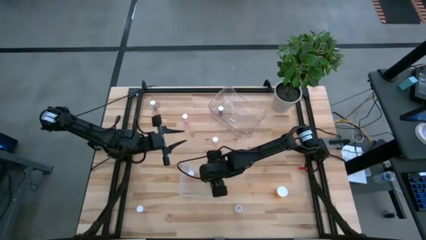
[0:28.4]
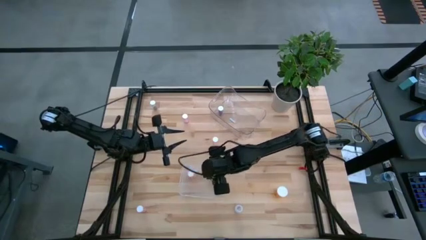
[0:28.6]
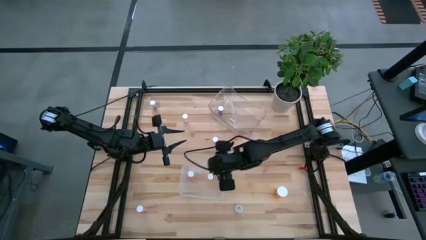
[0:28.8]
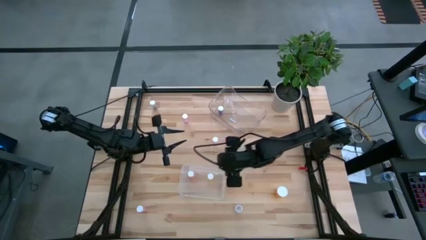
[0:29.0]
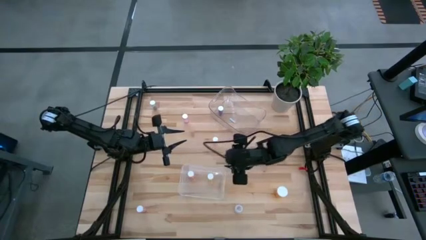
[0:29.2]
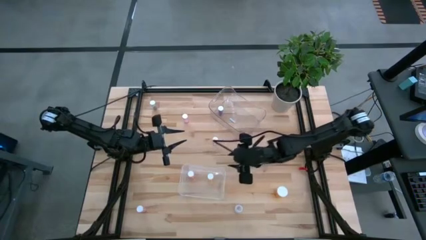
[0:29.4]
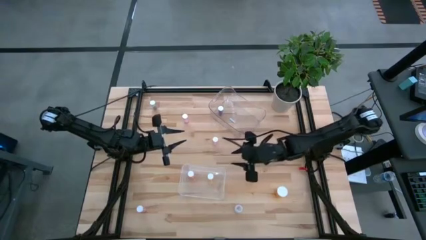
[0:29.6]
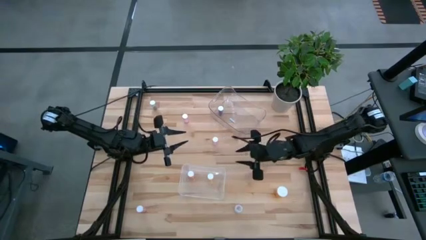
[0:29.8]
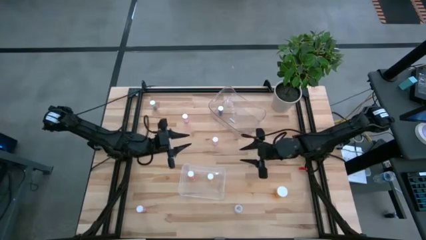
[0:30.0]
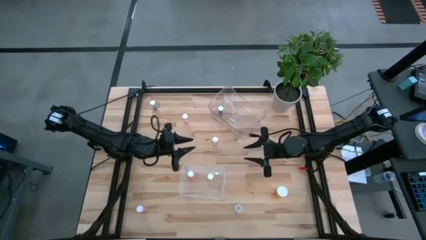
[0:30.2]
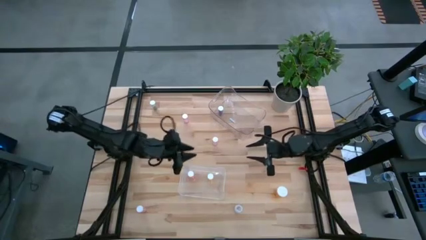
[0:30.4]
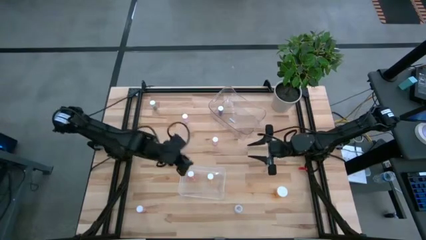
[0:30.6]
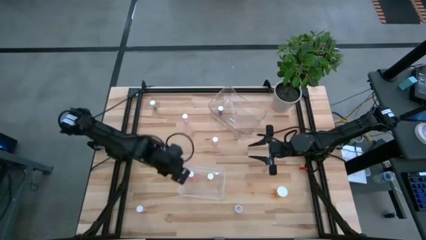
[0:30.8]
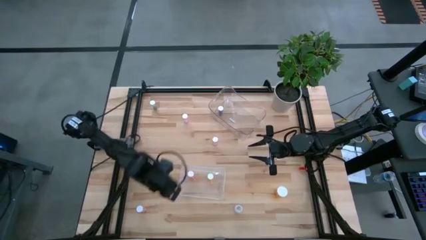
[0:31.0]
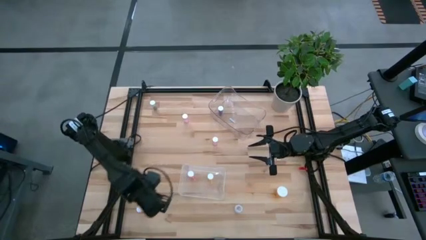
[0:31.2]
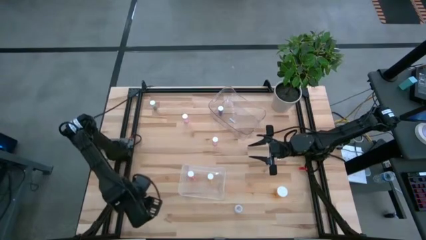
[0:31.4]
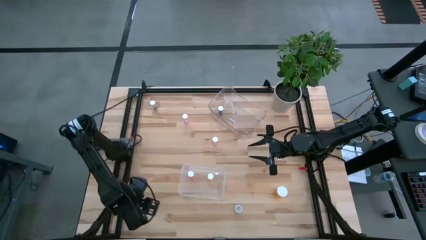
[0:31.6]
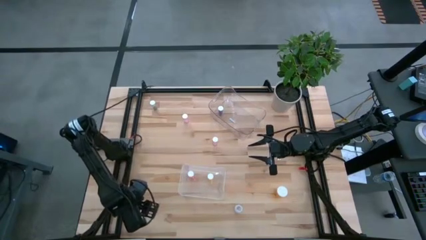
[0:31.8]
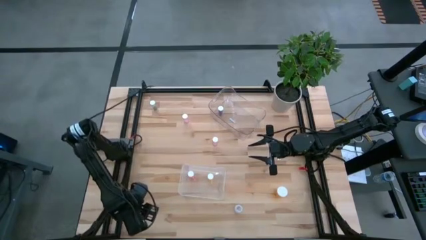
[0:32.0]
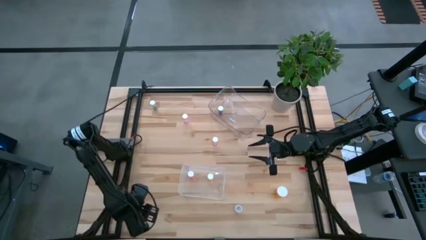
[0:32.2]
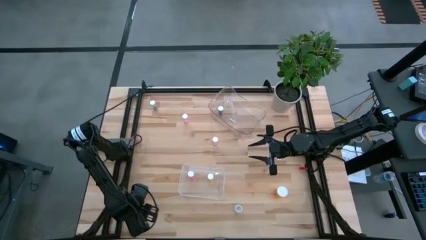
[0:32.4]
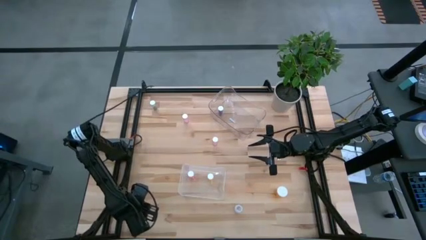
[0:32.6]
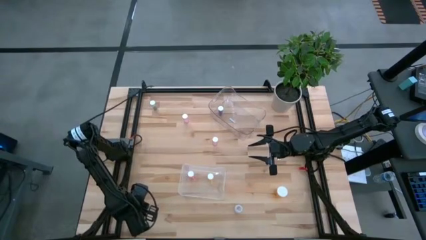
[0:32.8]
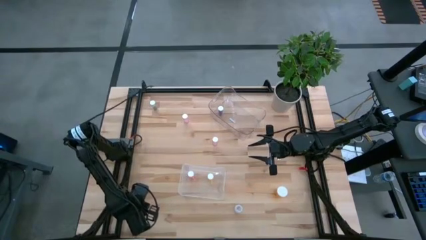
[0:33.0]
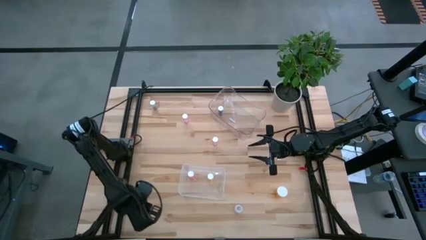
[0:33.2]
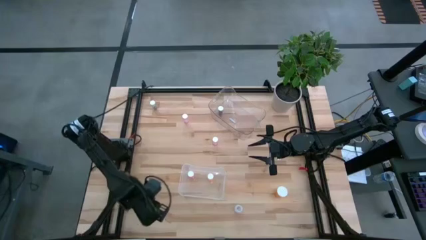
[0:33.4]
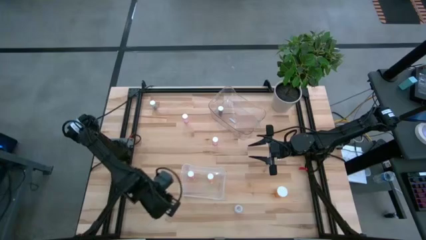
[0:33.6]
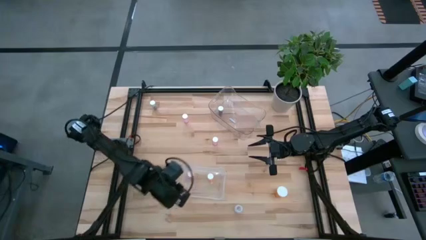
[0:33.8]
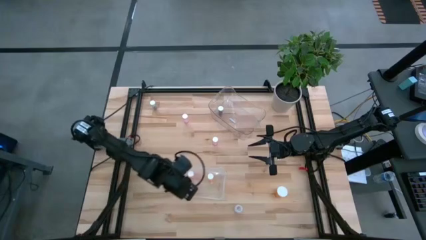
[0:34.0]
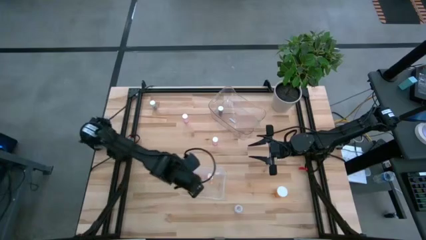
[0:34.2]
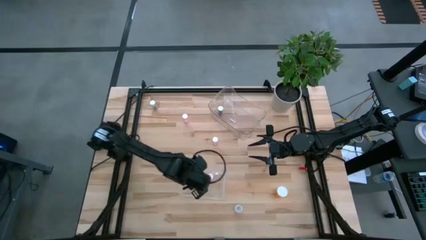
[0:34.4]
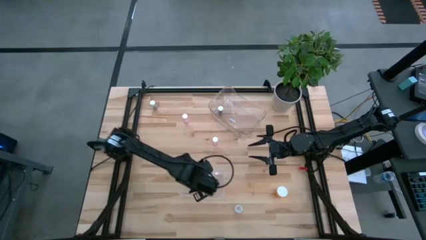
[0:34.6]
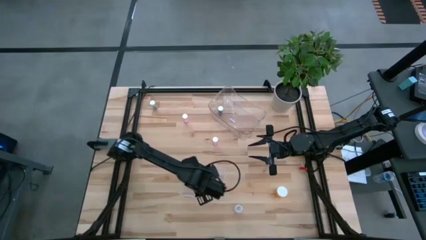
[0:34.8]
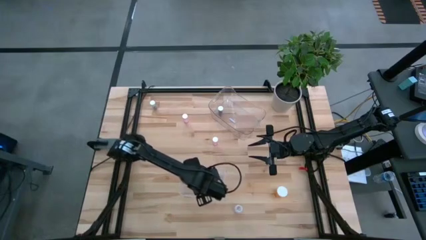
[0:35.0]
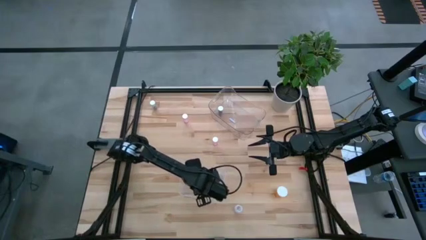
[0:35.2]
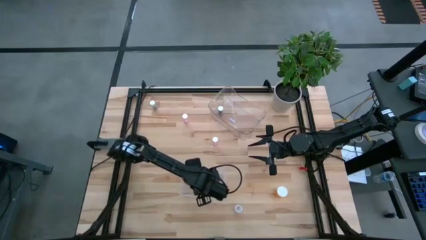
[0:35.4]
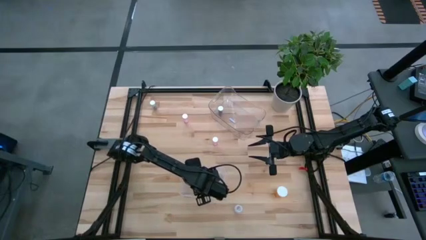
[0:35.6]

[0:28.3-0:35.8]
Task: Pick and place medicine bottles into bin by pill shape (circle, oval)
Put the bottom purple tablet bottle into the bottom transparent bin

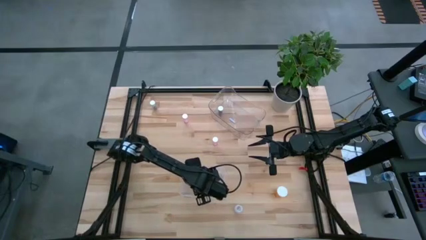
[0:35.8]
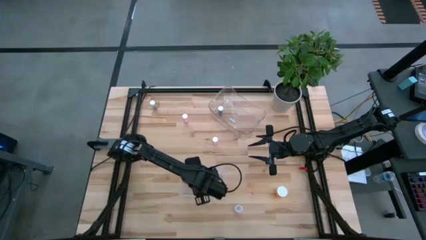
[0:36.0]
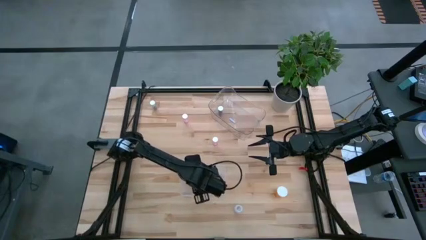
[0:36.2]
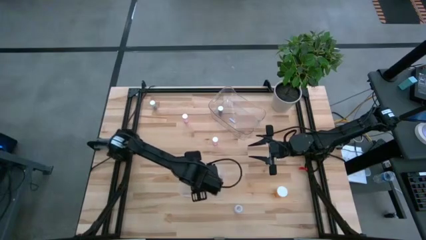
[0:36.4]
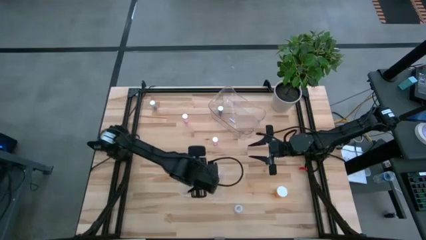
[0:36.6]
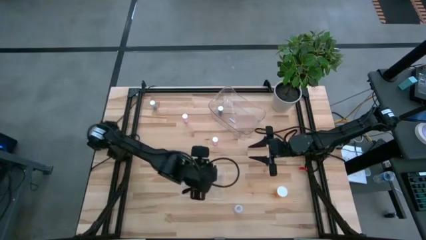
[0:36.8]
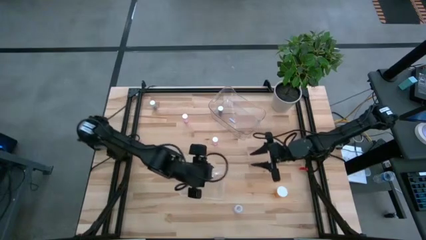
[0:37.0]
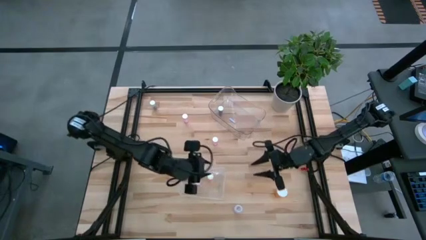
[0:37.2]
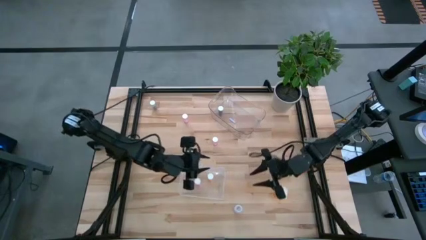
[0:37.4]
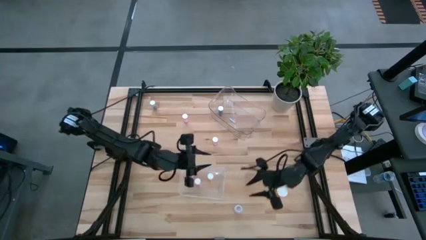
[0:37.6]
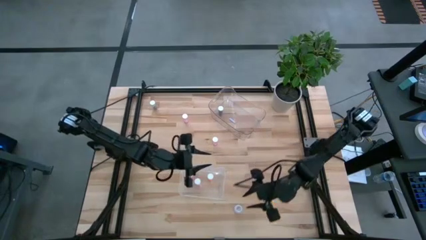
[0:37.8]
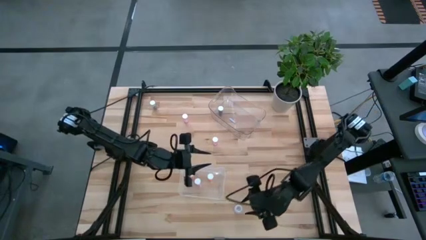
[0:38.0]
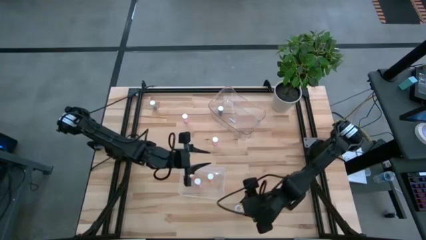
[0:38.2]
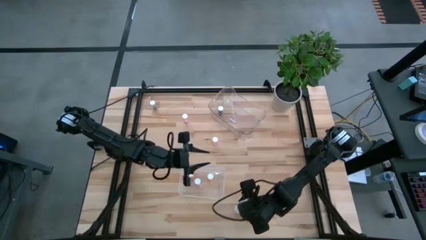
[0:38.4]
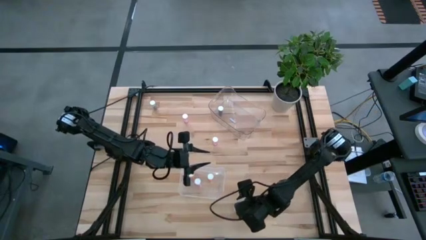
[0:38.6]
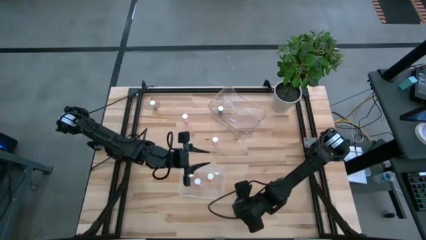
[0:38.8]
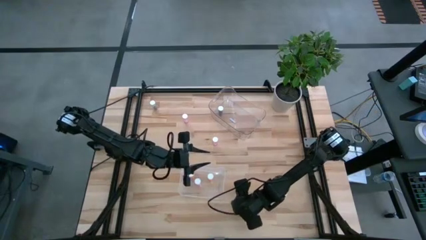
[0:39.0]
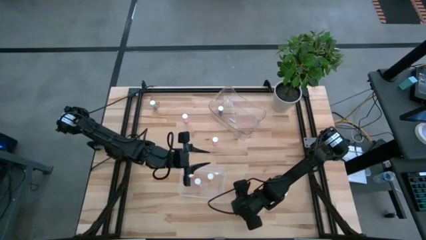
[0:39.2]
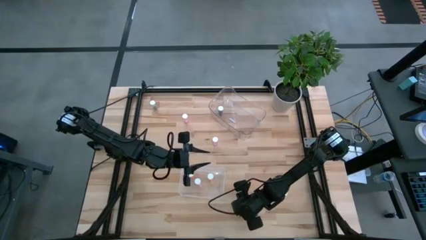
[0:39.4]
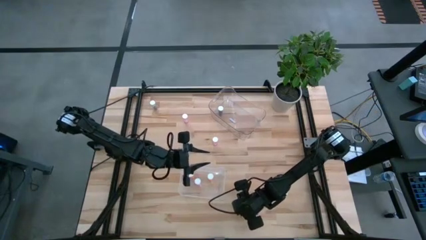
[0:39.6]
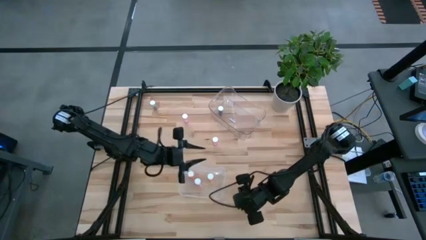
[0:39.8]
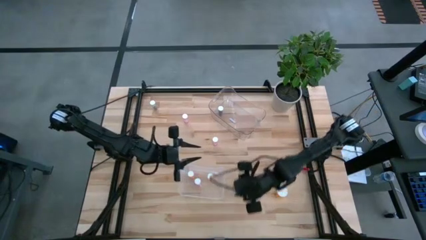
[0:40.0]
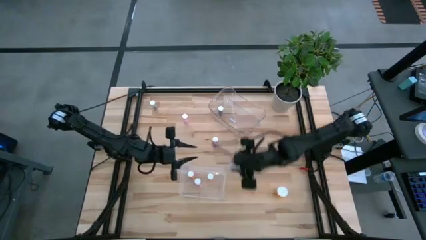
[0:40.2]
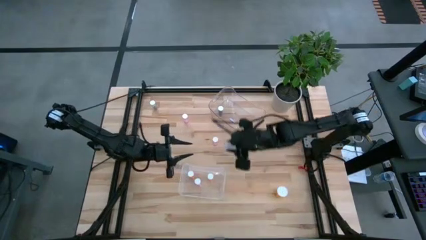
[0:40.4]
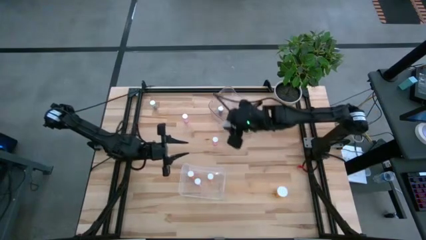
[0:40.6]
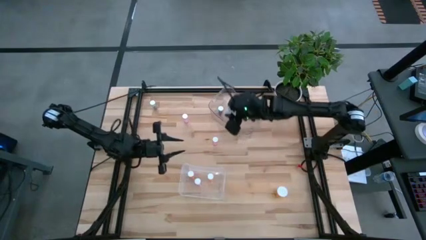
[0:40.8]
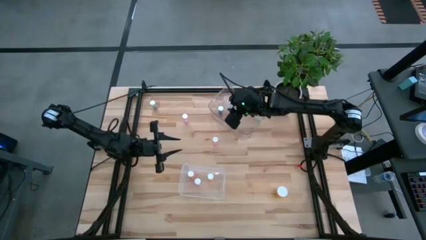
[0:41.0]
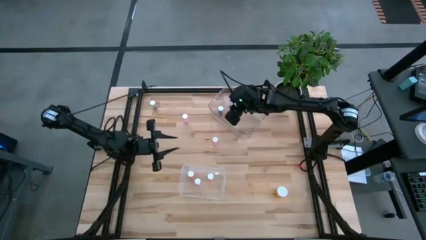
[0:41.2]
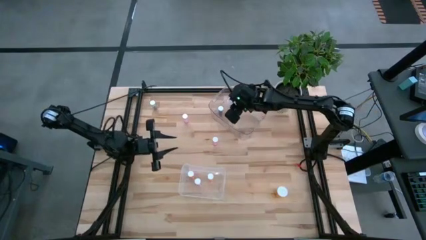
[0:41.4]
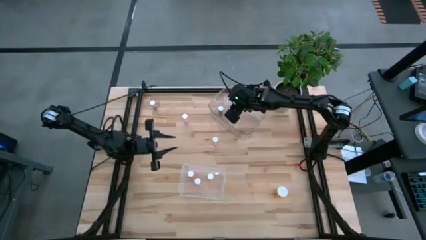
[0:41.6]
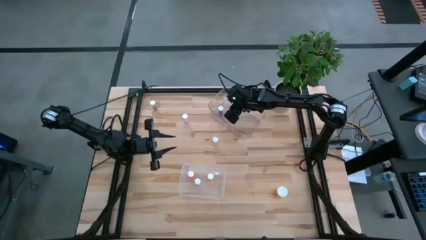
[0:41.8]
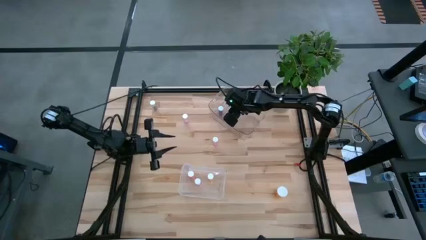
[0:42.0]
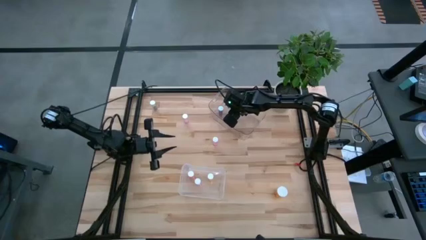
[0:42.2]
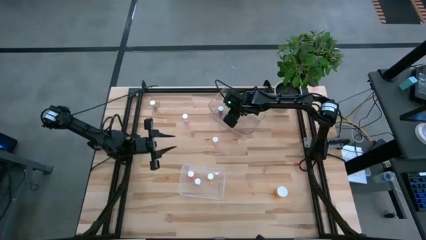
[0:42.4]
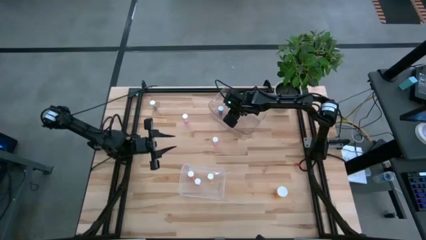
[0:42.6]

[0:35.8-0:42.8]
Put the transparent capsule bottle into the top transparent bin

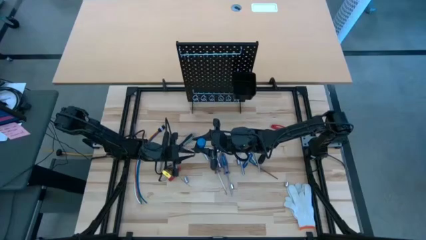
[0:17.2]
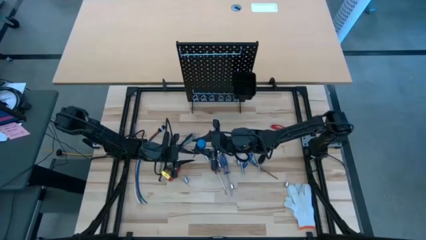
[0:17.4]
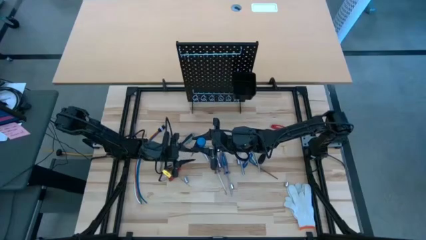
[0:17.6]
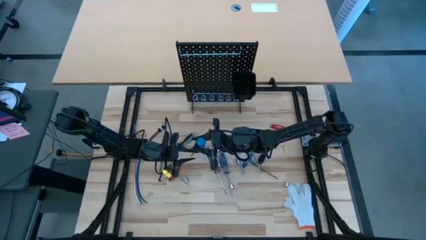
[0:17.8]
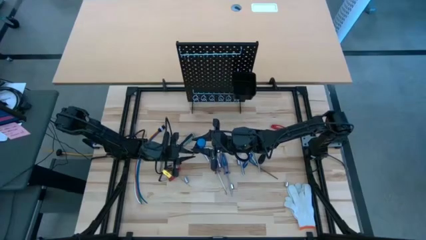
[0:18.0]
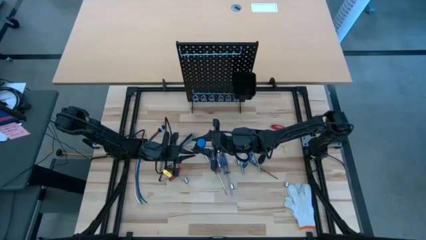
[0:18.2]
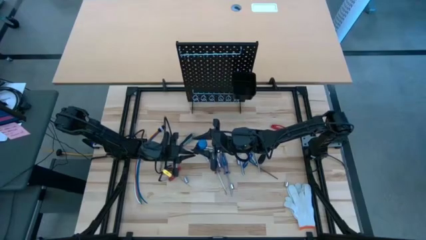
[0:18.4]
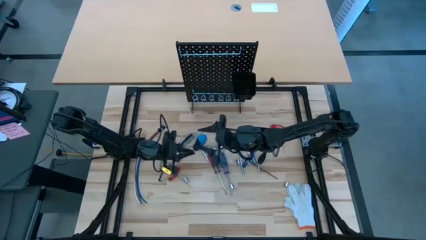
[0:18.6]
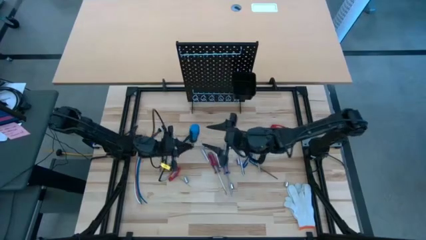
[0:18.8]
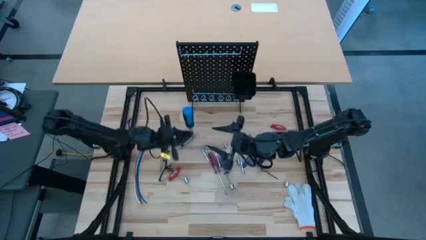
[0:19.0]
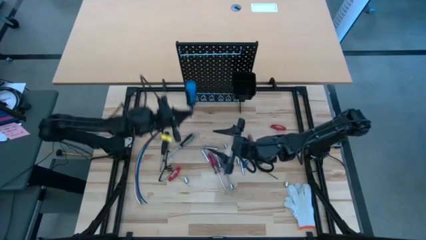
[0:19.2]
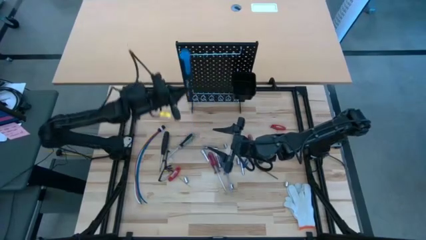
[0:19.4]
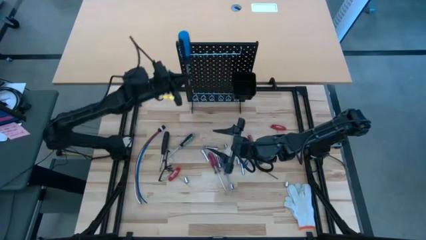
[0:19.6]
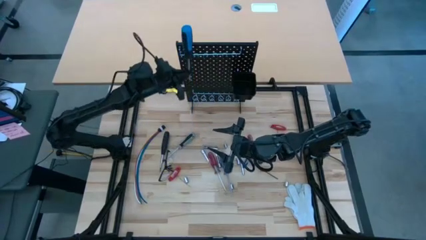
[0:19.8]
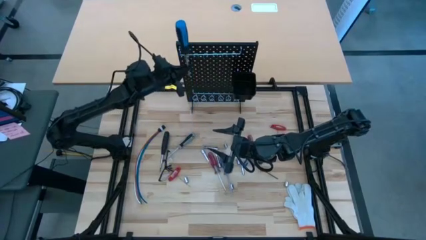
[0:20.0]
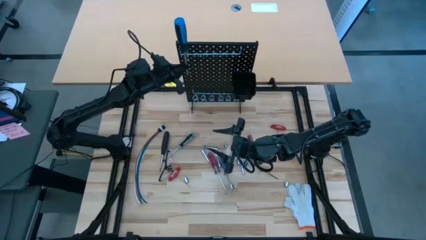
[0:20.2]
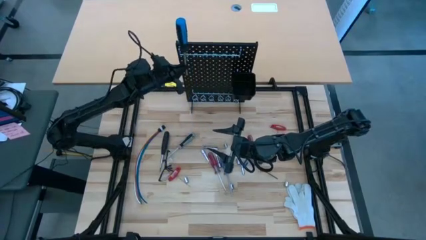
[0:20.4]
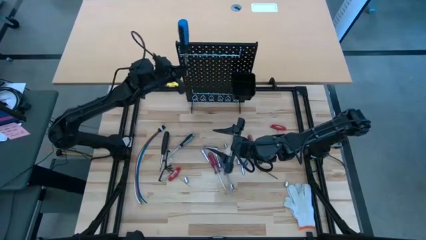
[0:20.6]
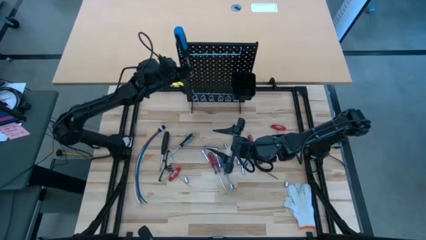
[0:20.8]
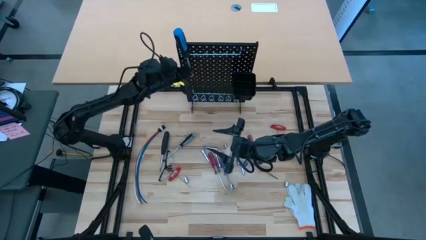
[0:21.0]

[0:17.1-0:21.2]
Task: Hang tools onto peg board
Hang the black-blue screwdriver on the pegboard
